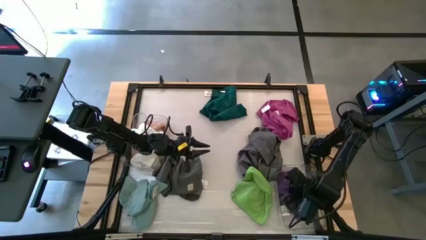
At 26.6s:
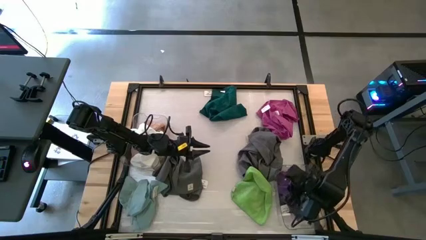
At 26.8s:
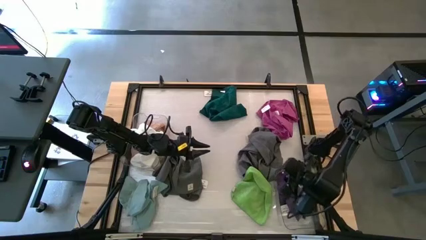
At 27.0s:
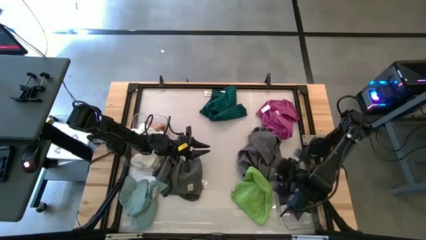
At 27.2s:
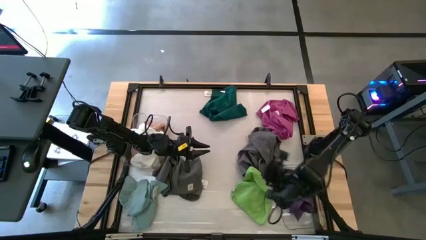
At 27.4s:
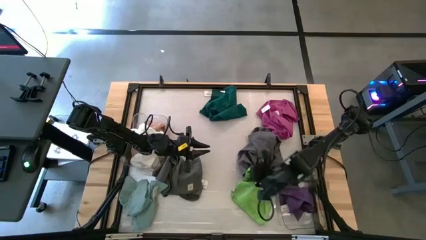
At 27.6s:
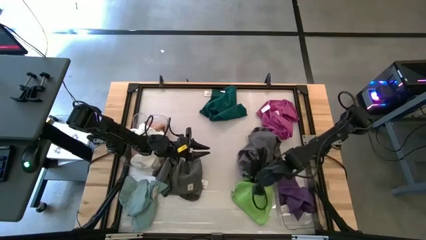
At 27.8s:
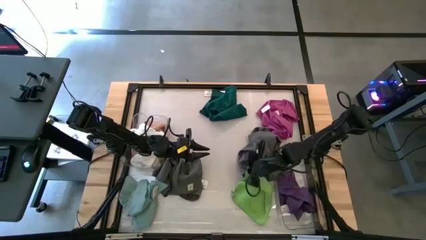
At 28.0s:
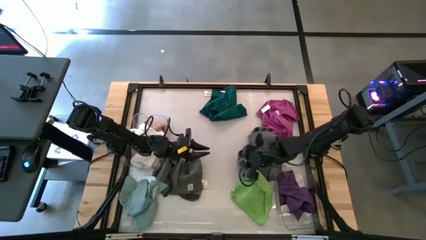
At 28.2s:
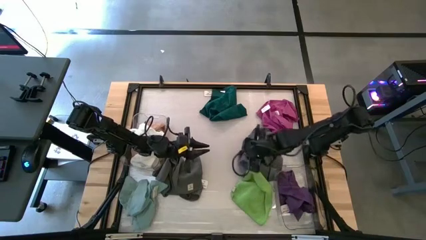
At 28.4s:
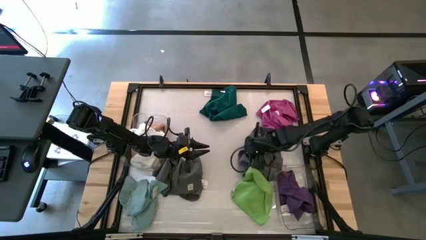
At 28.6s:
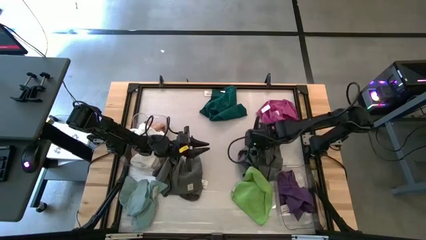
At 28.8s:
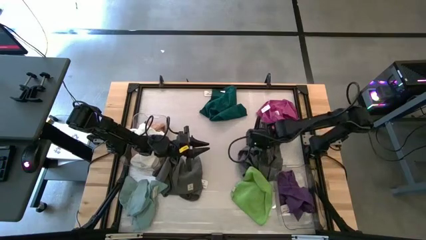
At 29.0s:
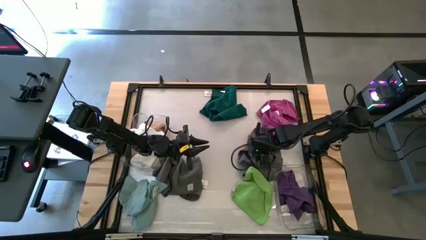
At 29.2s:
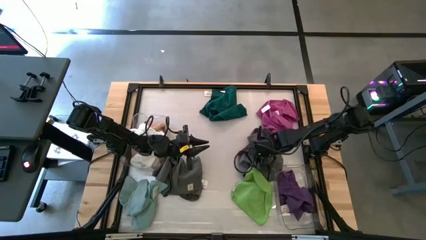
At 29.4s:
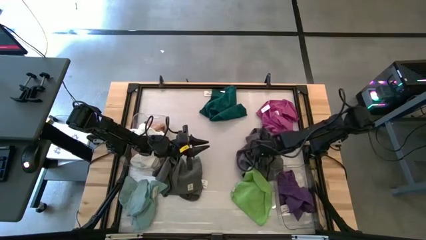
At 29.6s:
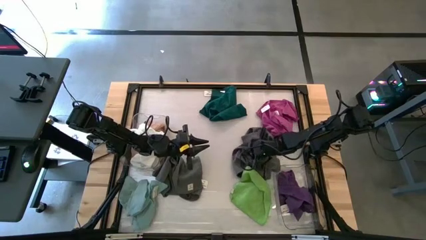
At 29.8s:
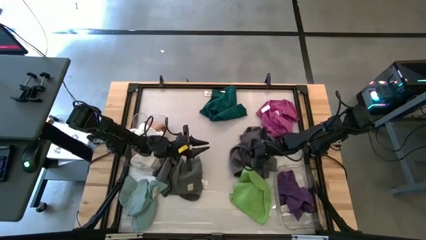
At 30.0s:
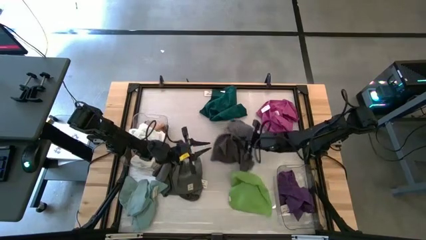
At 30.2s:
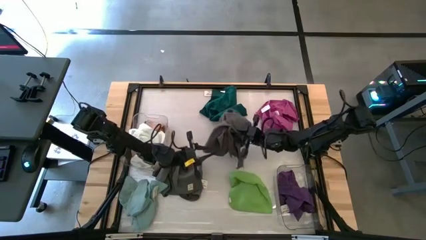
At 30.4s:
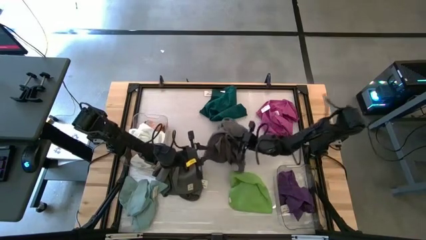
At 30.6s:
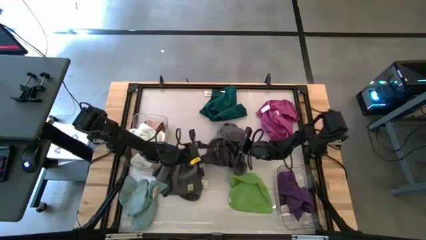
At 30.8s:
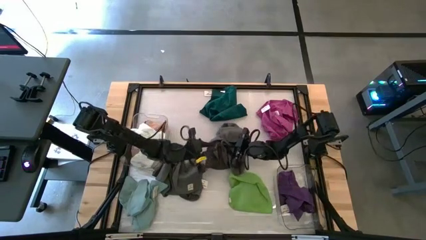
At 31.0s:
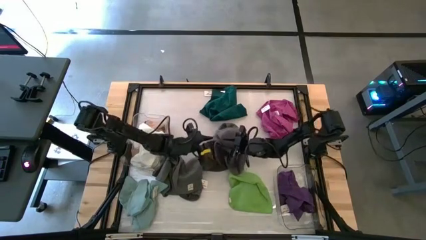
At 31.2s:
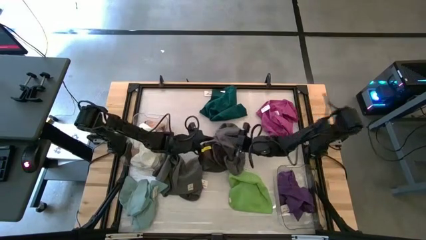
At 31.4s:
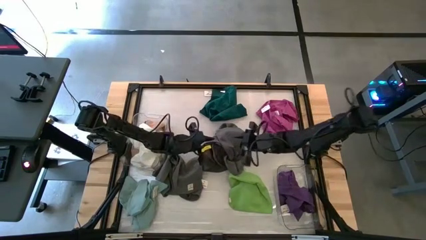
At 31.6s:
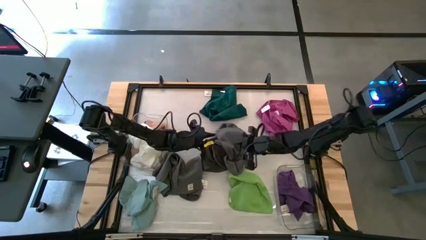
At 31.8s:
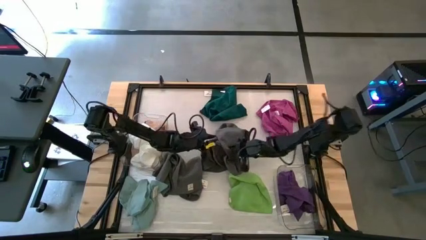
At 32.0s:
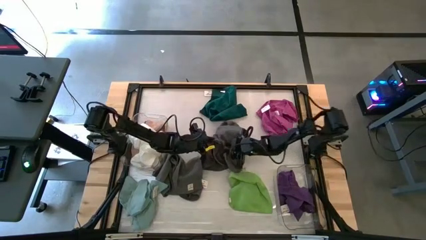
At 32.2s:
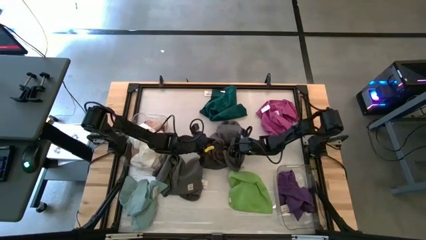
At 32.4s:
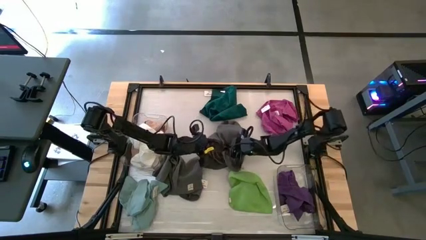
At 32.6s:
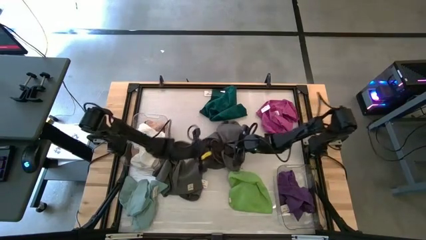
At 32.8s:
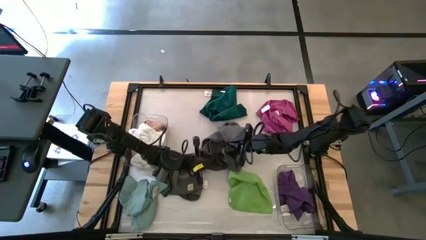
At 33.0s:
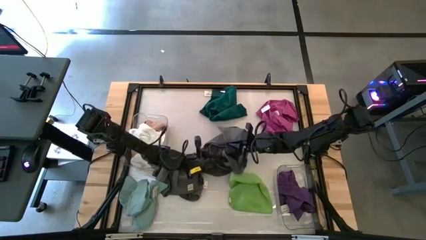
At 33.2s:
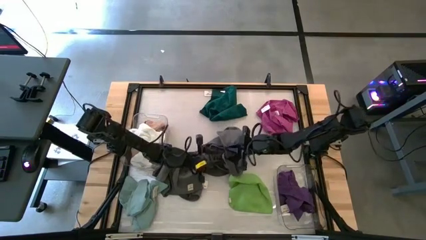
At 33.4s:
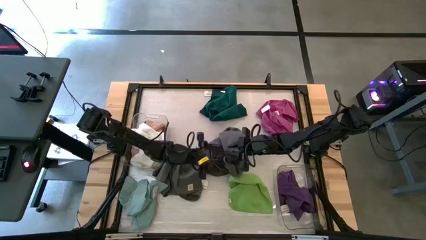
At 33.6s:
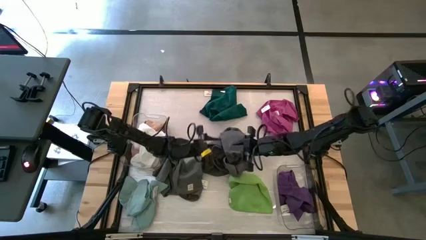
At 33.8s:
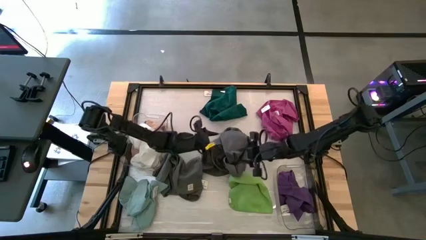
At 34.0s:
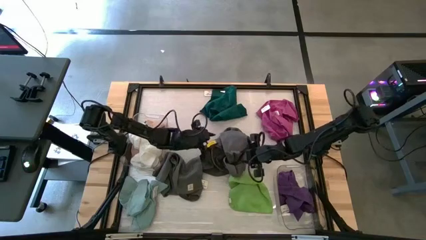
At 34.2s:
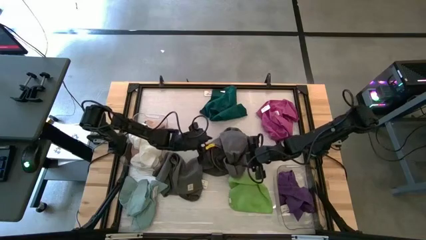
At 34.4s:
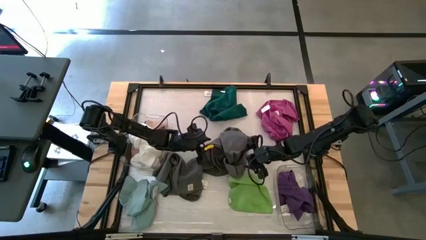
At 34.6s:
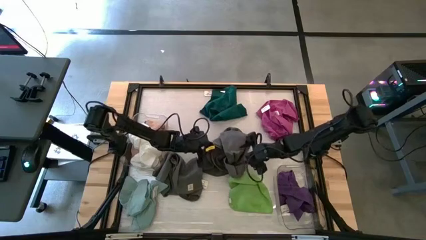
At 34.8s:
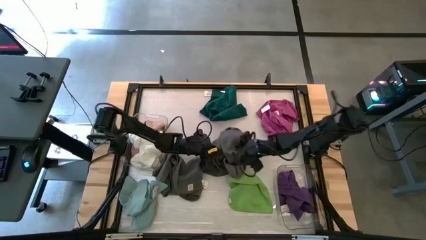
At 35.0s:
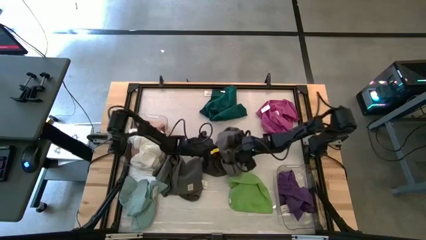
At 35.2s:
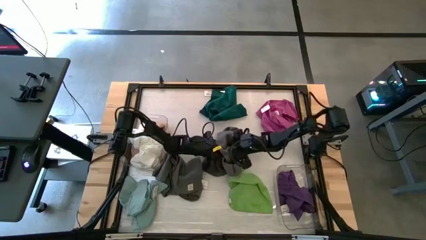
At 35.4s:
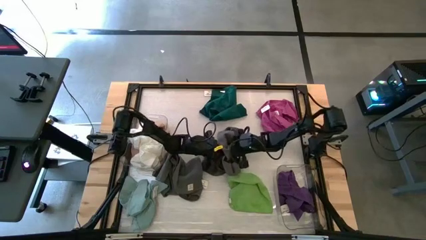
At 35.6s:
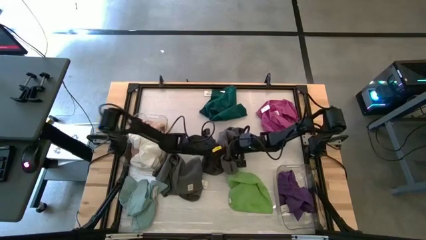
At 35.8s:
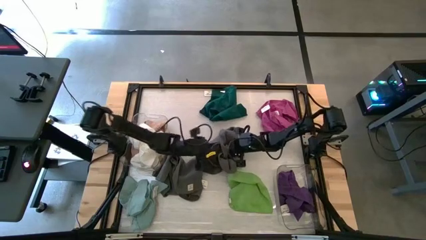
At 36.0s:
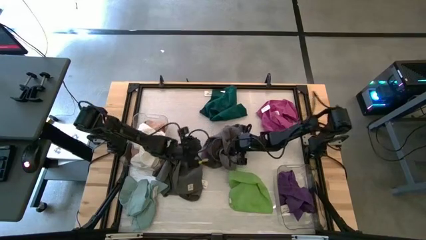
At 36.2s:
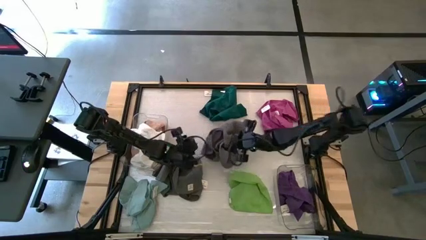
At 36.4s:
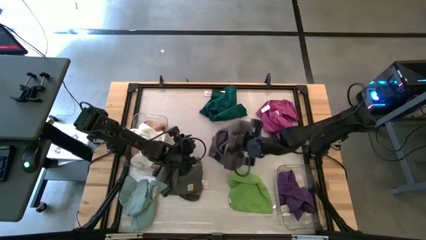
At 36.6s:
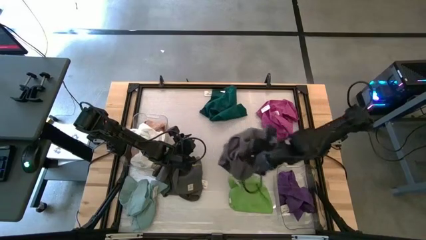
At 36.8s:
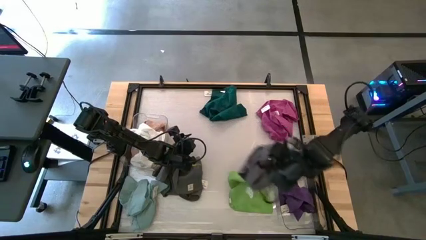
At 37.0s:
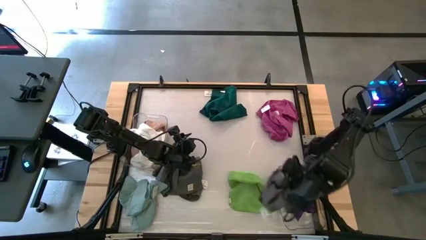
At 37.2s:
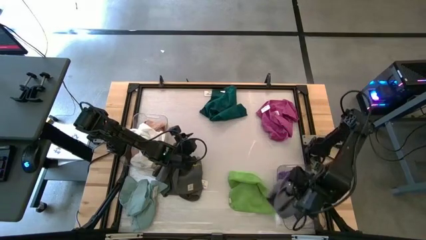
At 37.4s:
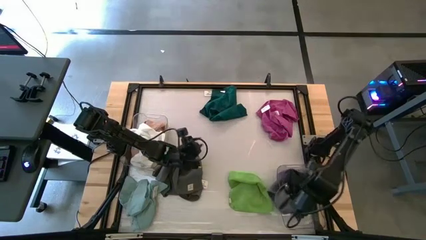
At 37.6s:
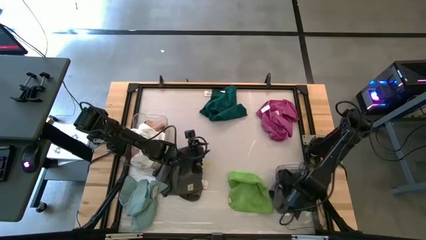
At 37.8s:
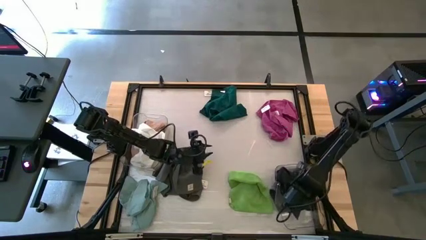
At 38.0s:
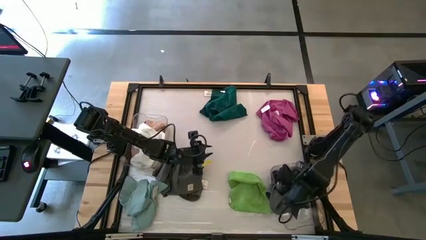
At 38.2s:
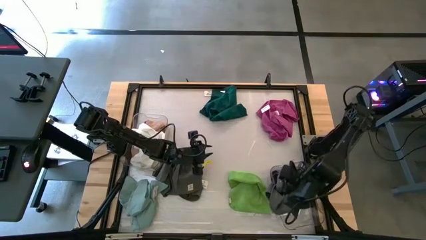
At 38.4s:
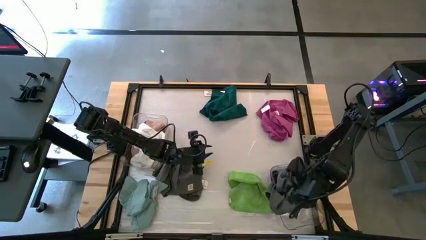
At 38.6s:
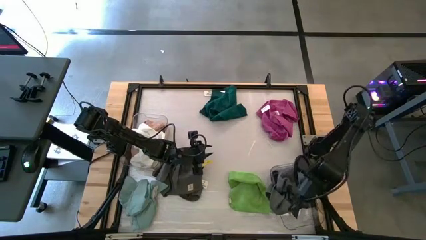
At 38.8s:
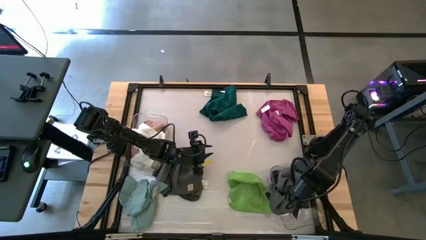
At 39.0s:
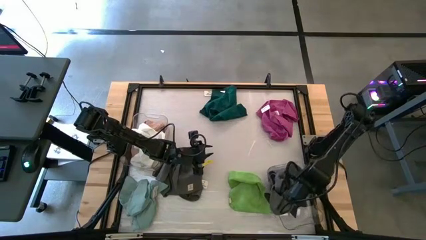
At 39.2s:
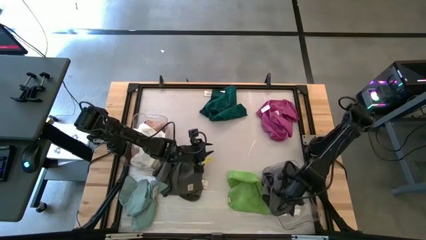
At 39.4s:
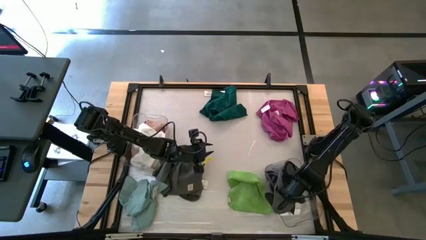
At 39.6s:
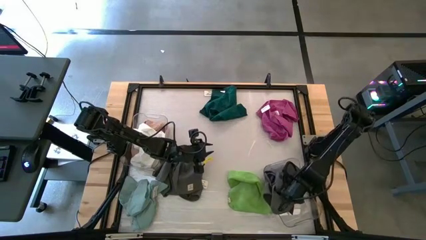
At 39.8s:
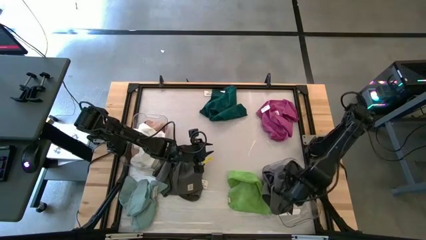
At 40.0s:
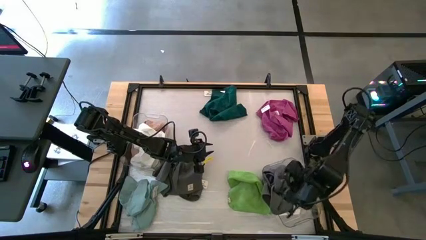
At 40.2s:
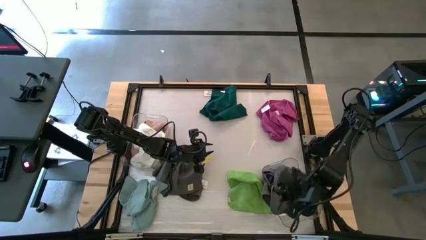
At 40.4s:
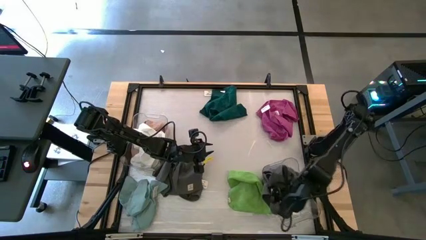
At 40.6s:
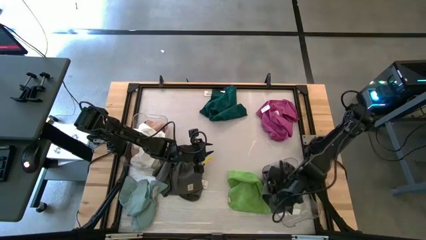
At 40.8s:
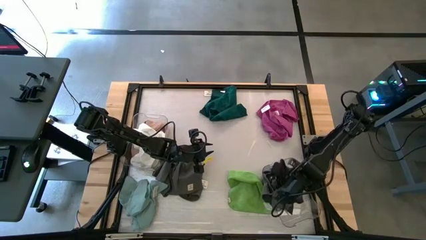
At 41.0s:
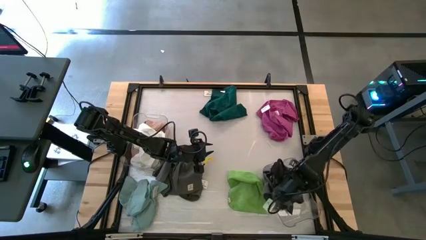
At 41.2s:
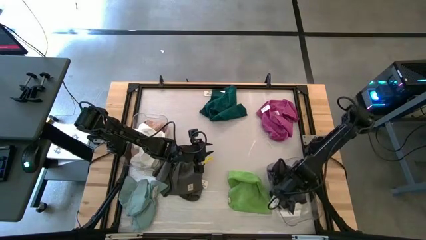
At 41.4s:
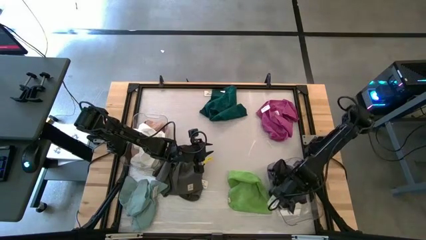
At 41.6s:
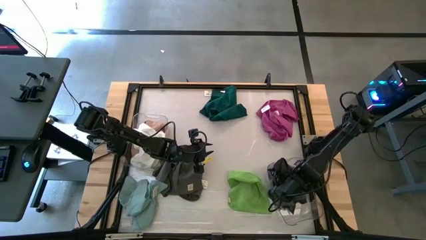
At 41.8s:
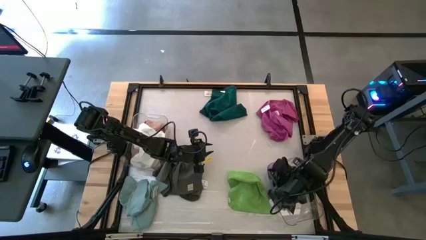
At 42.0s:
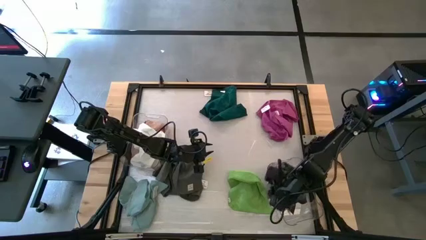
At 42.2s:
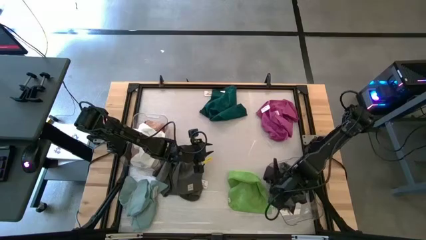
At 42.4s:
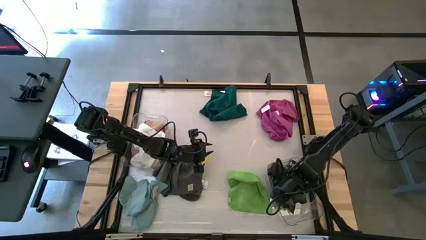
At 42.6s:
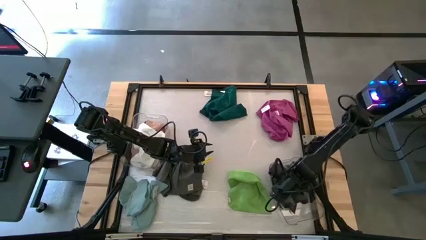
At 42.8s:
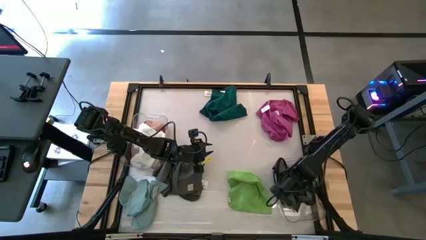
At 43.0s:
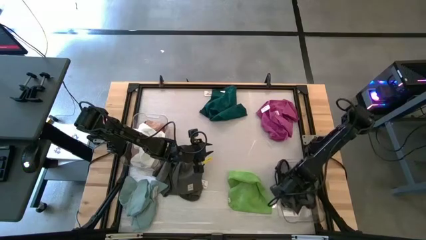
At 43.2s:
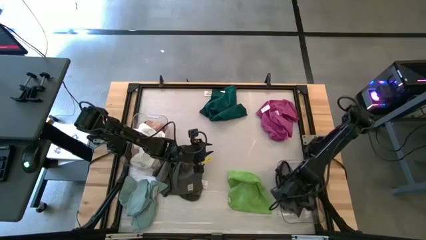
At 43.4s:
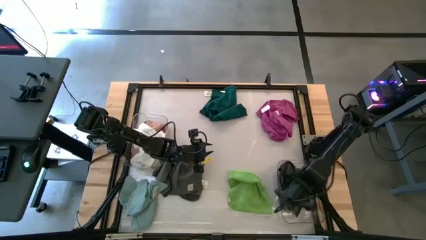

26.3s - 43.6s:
Task: Sort towels by color in basket
Put the gray towel into the right transparent bin
